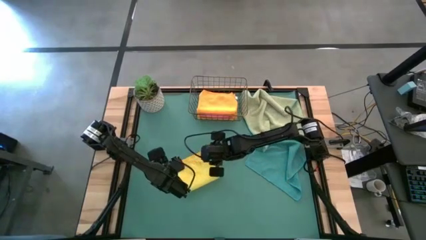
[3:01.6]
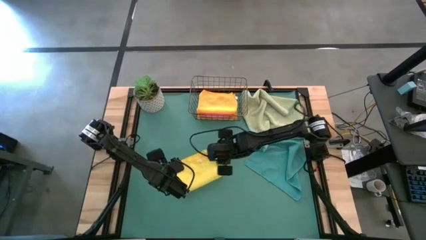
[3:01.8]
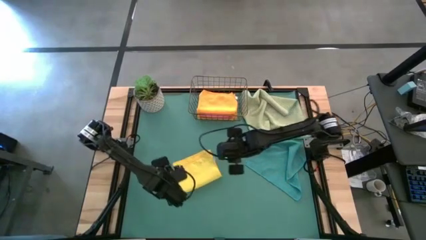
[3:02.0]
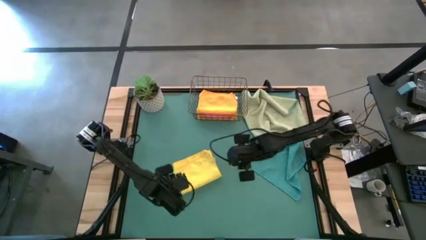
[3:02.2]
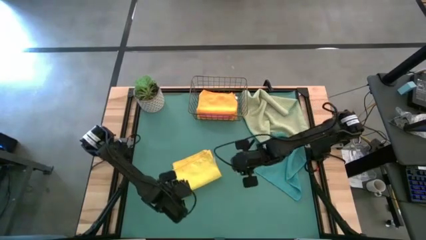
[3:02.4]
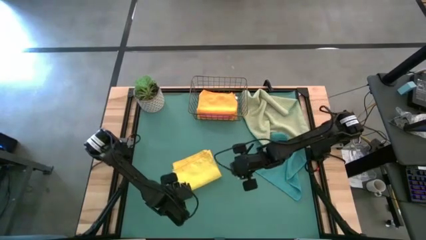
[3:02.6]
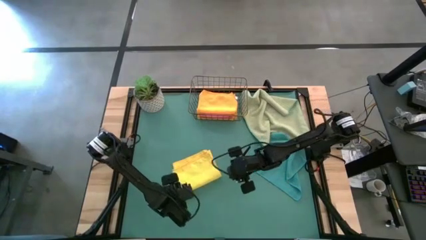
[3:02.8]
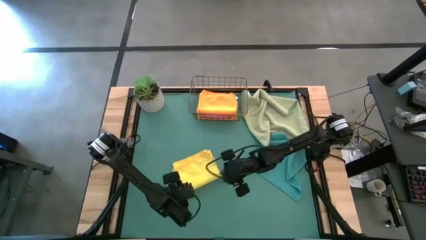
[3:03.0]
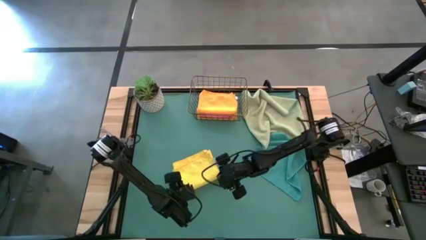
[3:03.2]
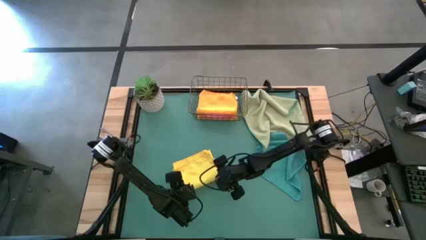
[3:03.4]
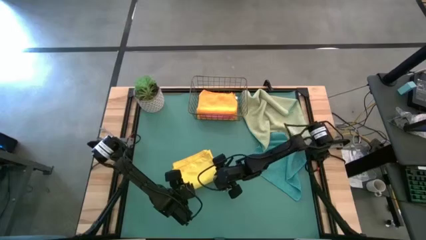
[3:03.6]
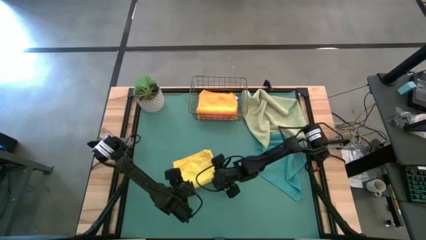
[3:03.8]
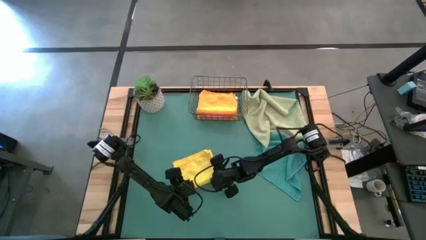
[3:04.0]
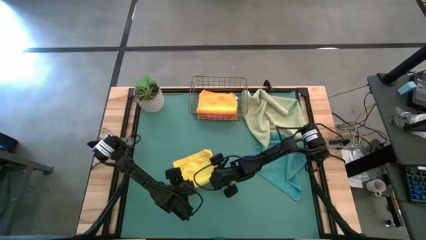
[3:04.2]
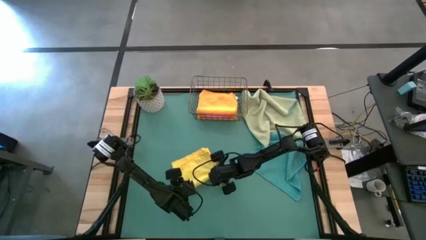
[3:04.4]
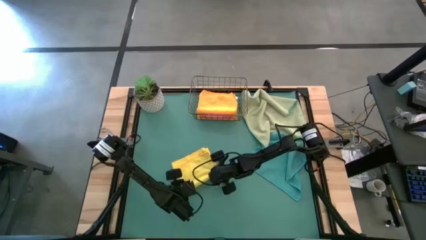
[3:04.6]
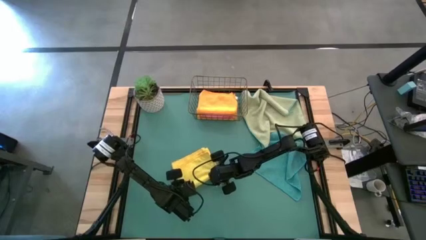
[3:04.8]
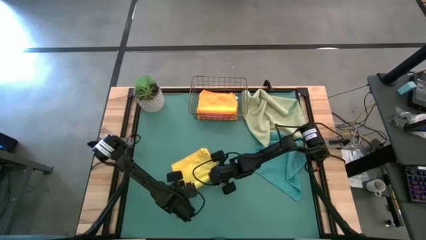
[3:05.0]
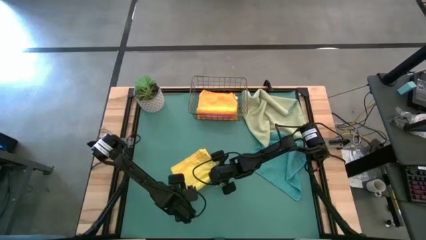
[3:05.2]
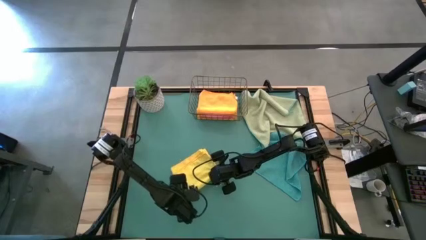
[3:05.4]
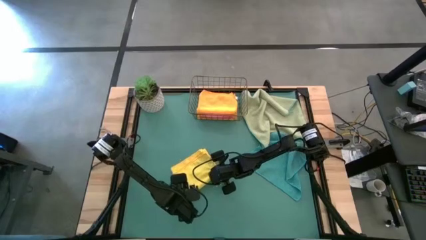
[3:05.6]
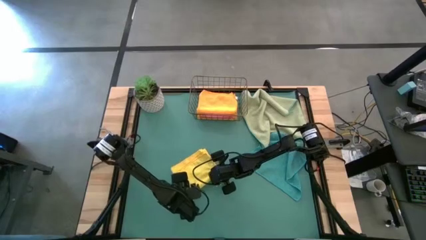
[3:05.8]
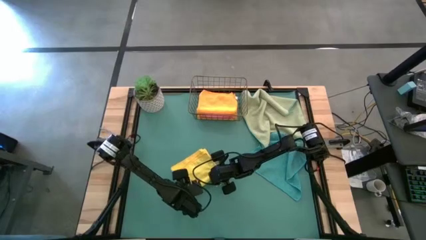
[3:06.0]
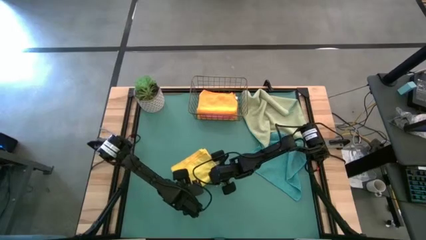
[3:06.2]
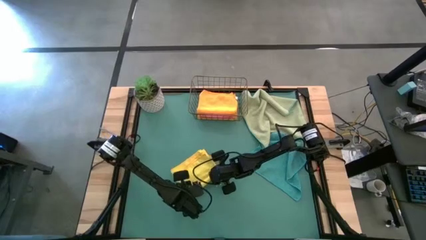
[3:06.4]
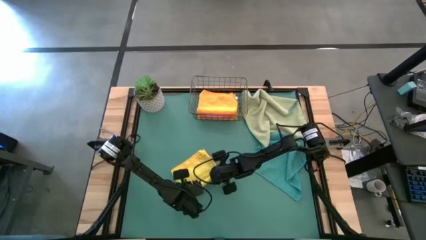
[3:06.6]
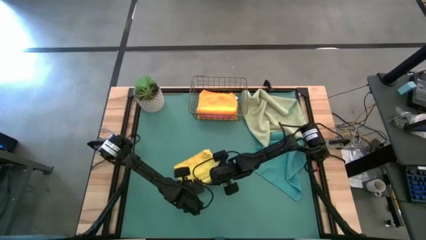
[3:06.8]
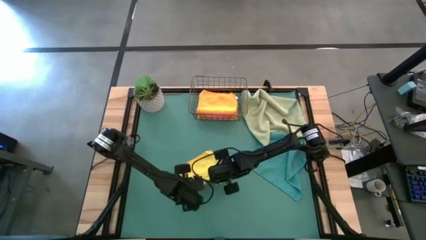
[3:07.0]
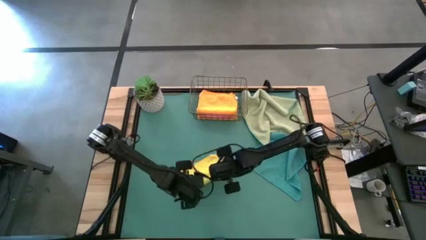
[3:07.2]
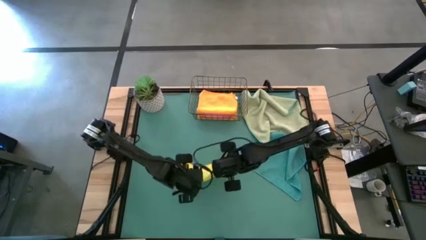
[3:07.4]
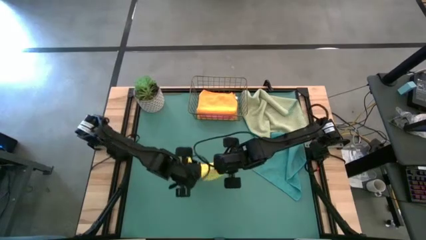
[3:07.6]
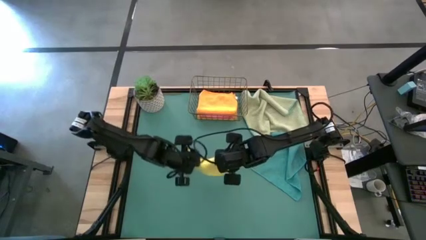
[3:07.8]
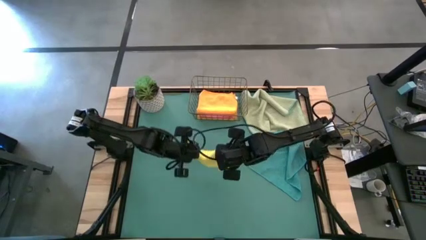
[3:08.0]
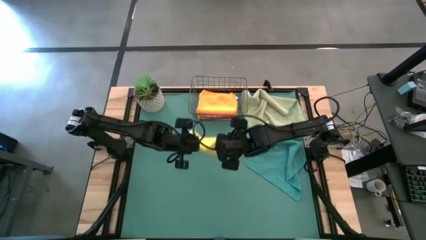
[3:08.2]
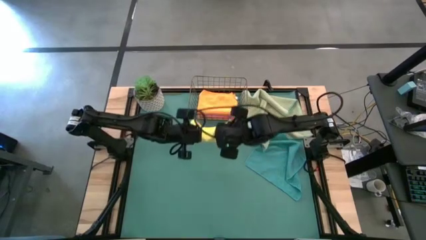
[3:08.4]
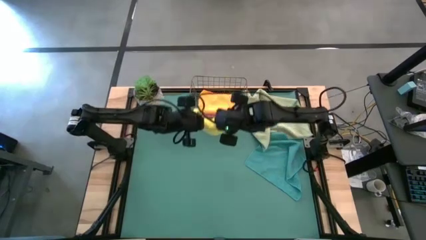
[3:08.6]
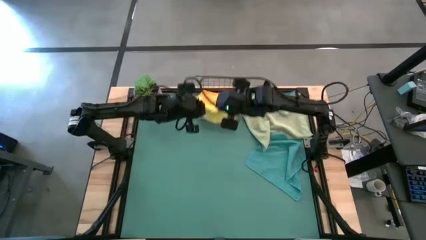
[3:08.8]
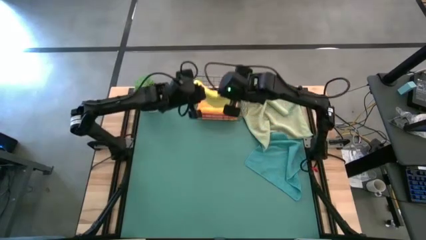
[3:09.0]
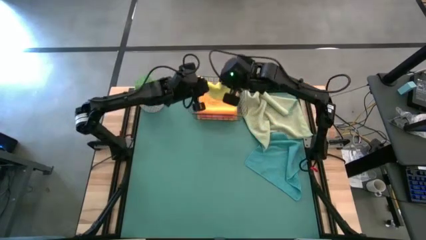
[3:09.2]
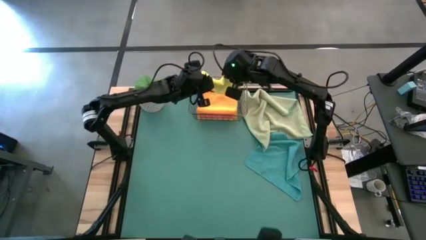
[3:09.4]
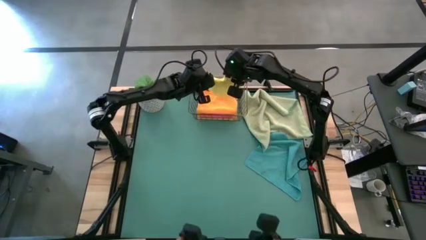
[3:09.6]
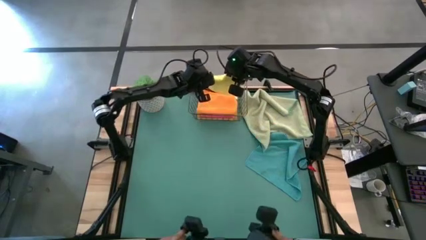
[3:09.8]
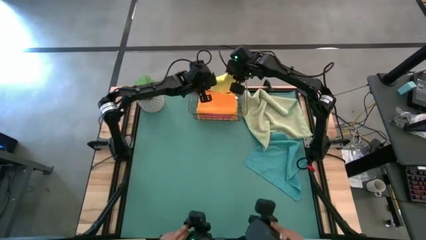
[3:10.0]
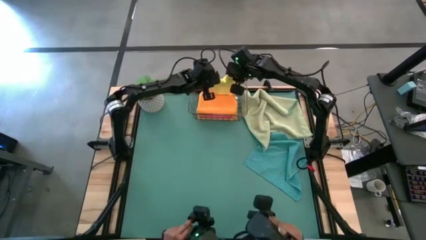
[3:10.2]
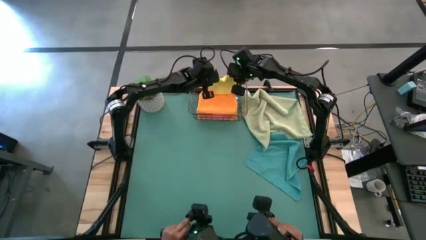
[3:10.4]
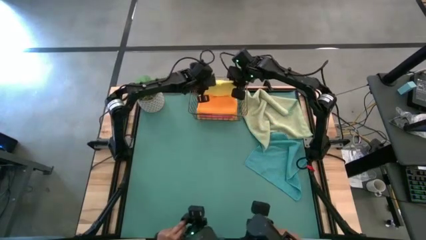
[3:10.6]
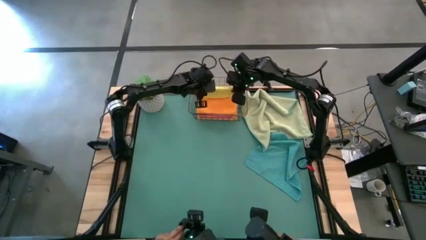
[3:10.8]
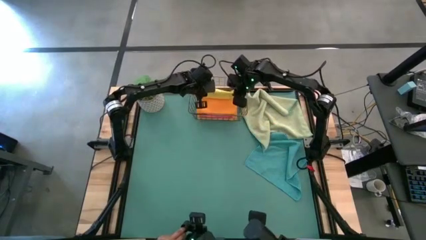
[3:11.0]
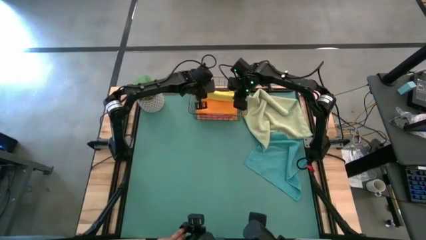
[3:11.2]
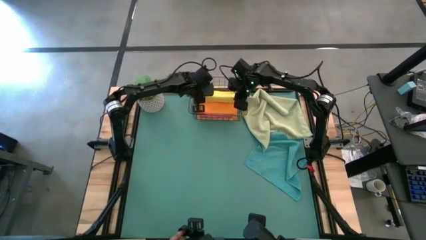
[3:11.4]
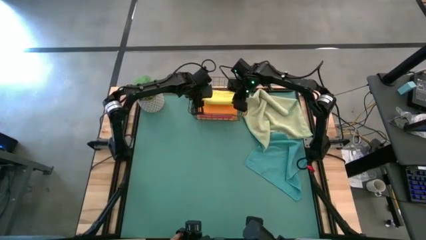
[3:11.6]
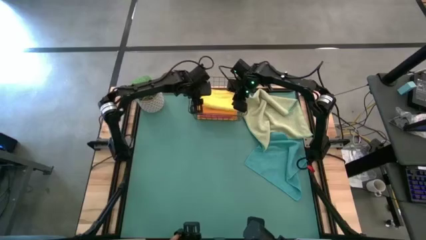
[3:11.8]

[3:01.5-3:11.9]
Task: Fold microfiber towels
Put the folded yellow microfiber towel into the wire basket

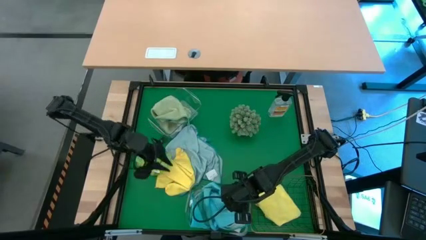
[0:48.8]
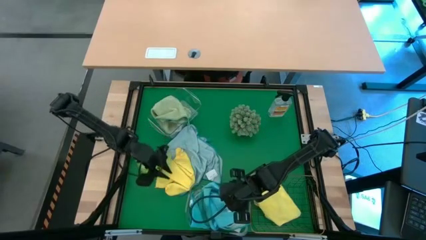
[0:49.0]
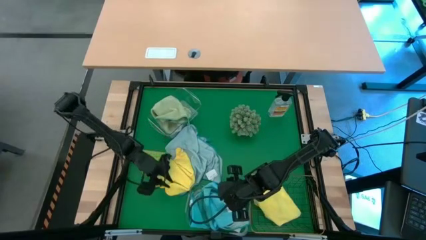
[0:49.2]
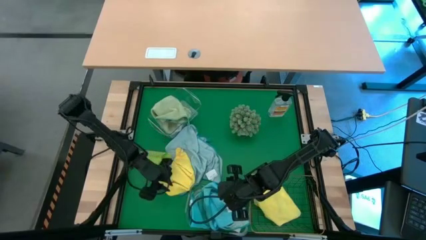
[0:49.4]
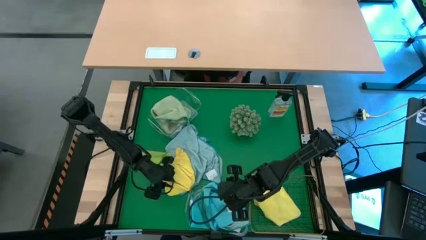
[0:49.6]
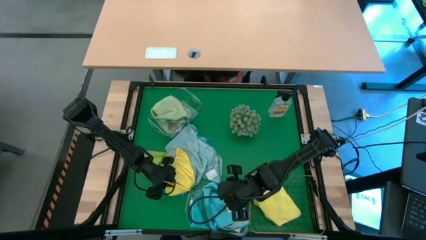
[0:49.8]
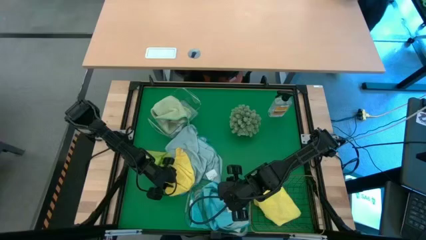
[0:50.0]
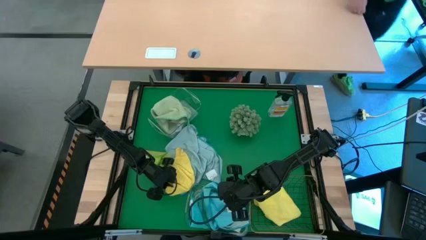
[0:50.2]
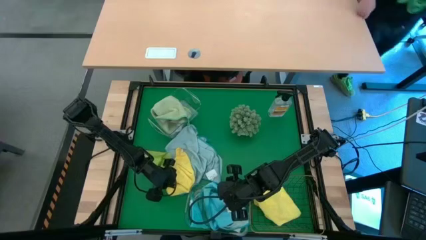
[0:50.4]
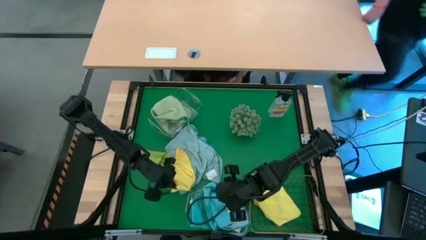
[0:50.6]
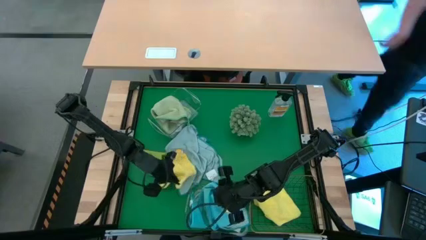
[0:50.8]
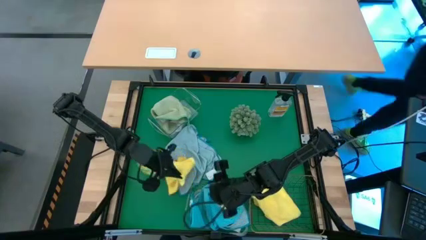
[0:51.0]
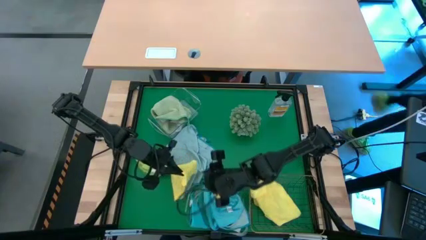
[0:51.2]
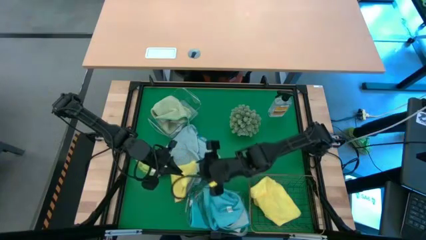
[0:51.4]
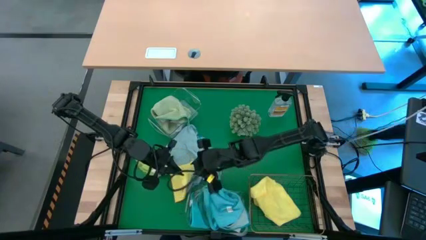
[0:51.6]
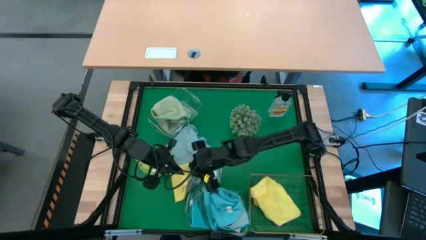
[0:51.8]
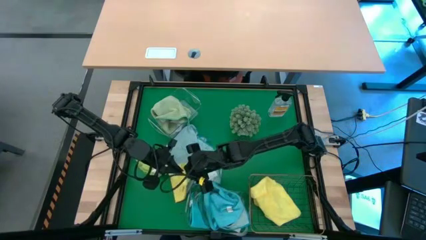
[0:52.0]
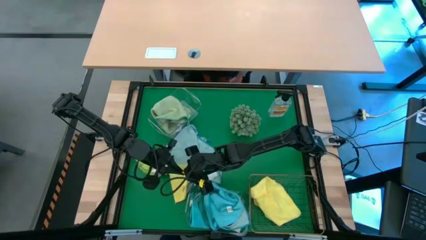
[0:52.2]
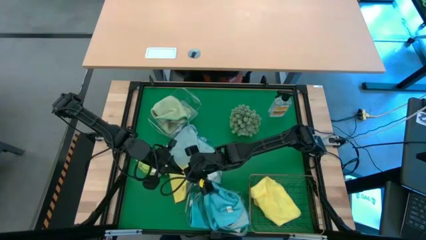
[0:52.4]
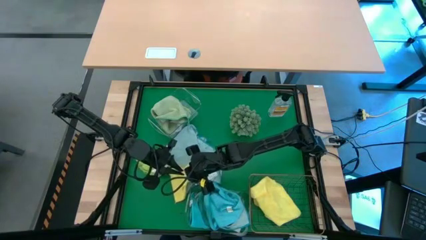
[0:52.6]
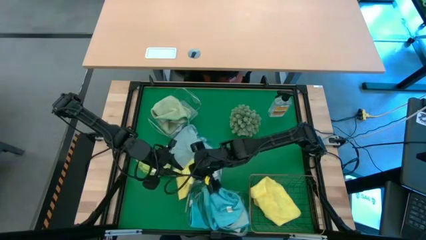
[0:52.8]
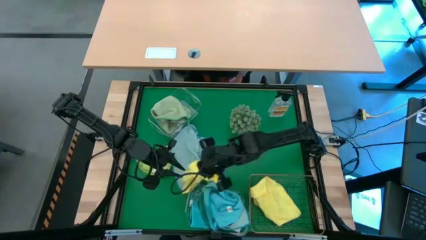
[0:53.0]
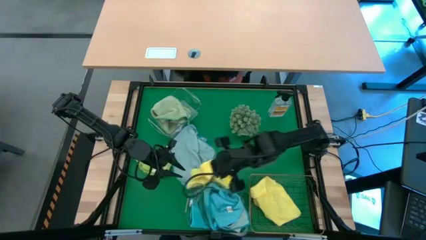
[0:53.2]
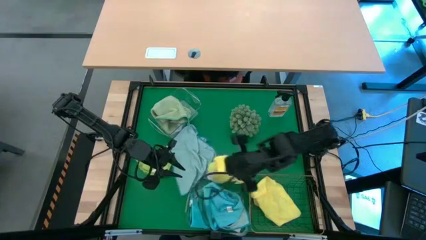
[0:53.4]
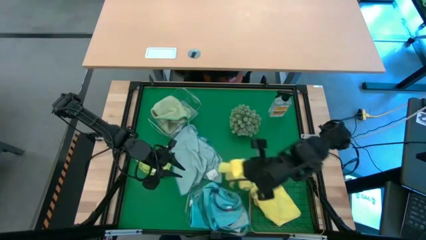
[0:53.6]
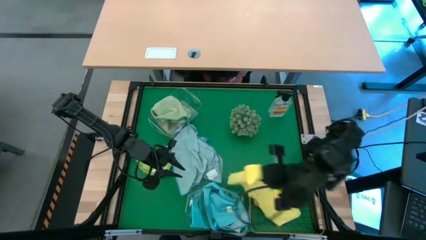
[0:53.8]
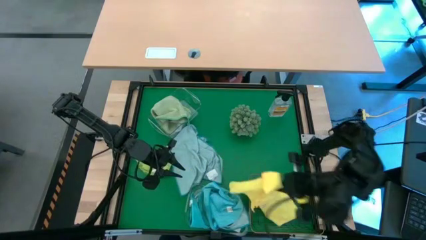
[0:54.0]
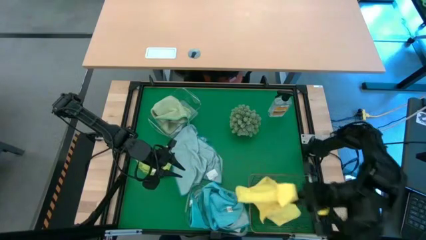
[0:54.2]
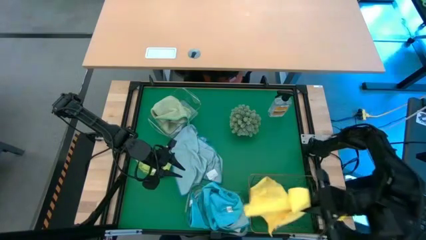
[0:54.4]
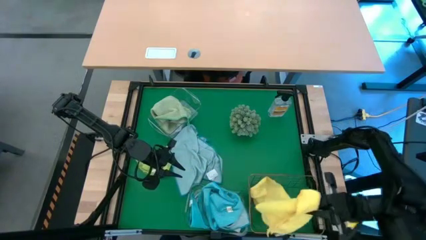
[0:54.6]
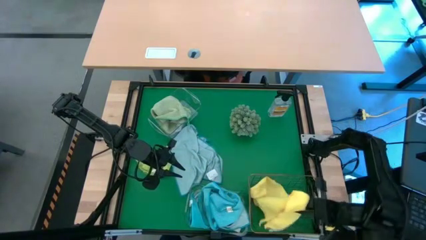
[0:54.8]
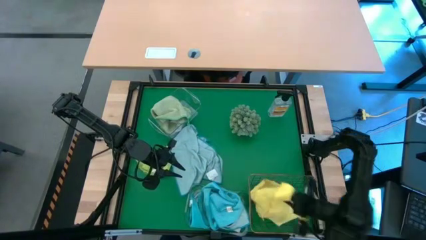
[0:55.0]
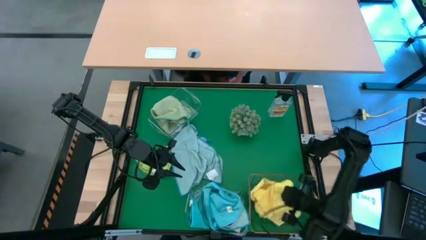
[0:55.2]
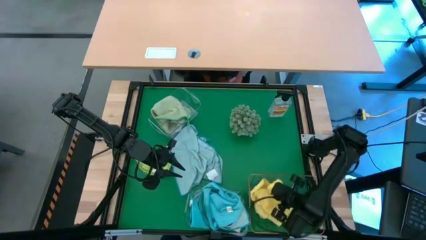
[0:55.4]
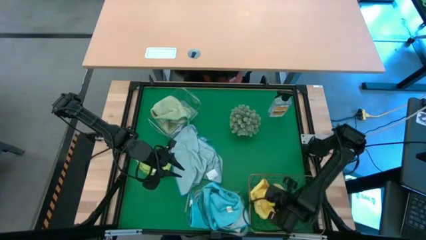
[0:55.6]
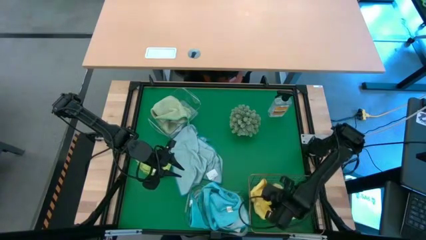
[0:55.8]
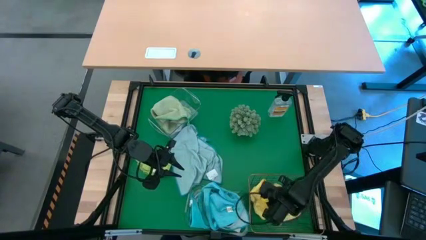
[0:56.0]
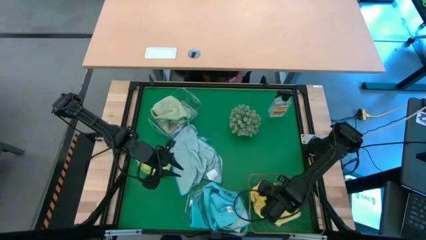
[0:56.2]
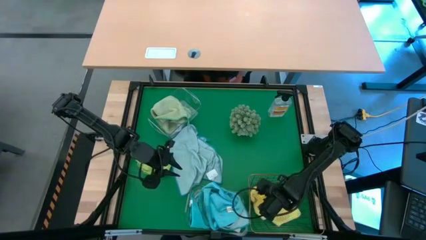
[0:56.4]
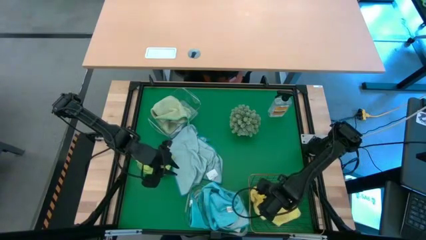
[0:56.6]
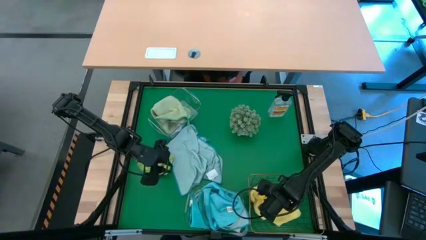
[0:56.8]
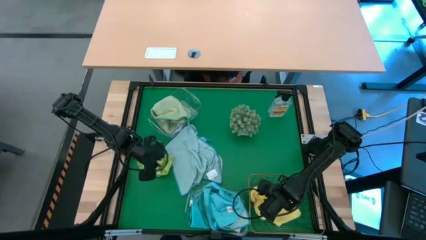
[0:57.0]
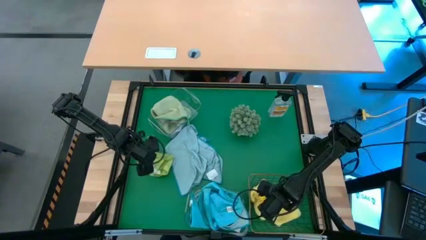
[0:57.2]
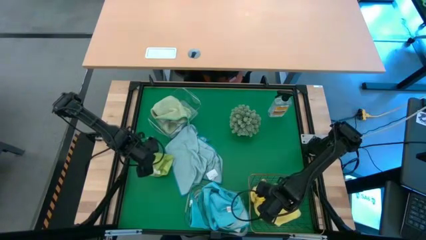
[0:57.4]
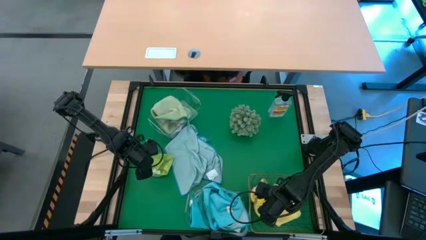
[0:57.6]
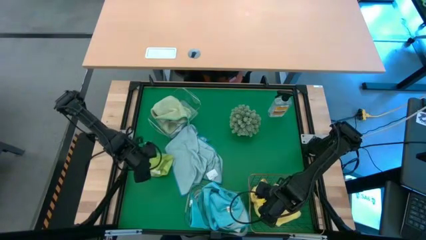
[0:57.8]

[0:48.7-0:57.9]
Task: Sort microfiber towel by color & place in baskets
Put the yellow microfiber cloth into the wire basket
